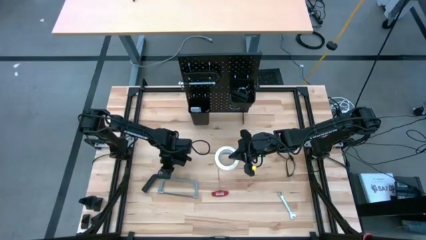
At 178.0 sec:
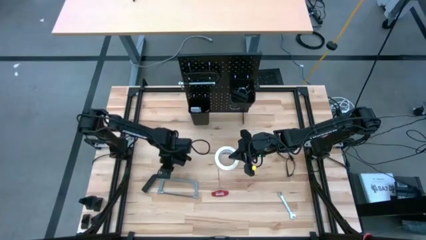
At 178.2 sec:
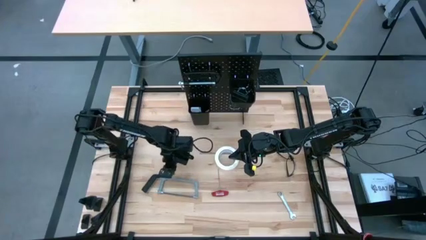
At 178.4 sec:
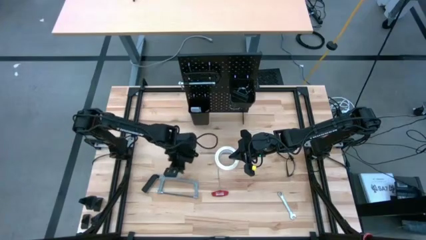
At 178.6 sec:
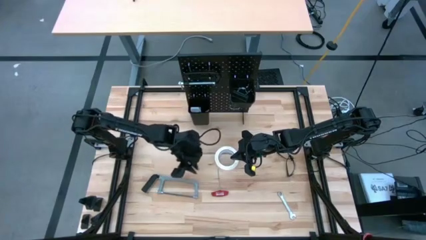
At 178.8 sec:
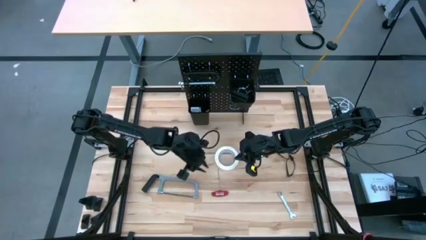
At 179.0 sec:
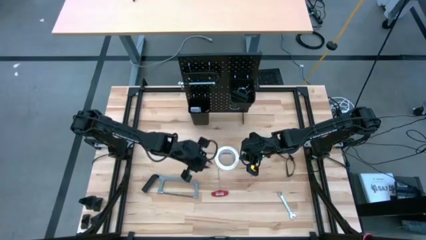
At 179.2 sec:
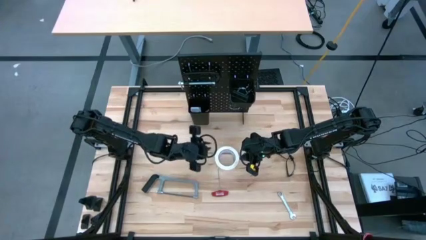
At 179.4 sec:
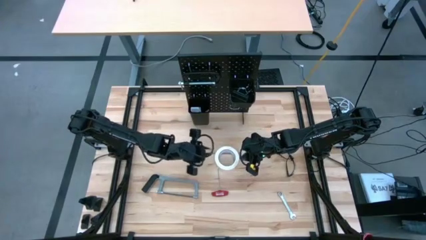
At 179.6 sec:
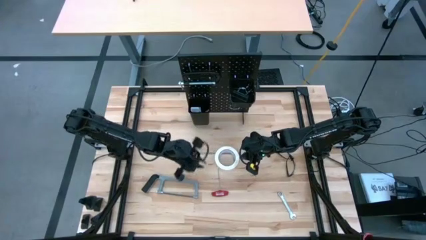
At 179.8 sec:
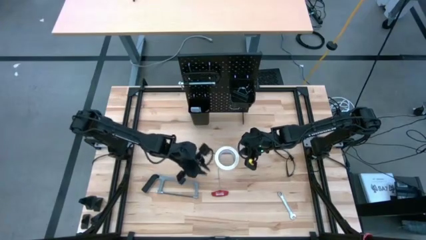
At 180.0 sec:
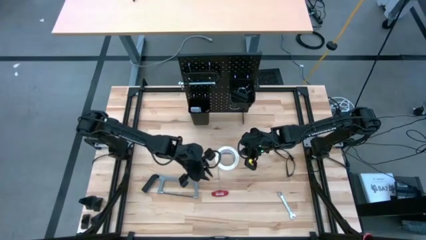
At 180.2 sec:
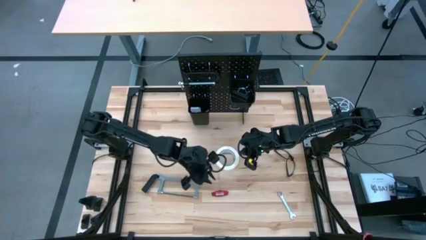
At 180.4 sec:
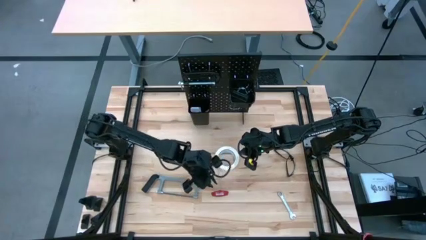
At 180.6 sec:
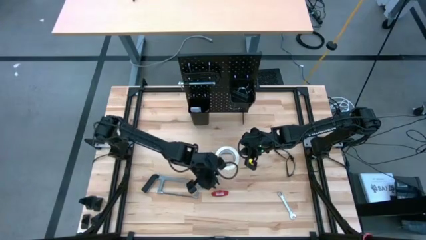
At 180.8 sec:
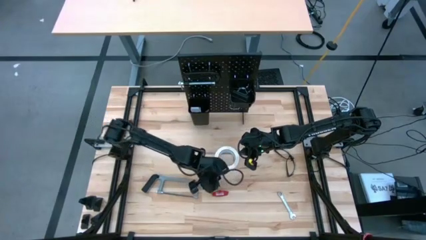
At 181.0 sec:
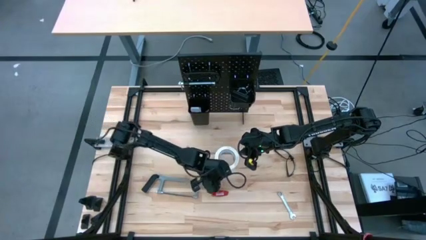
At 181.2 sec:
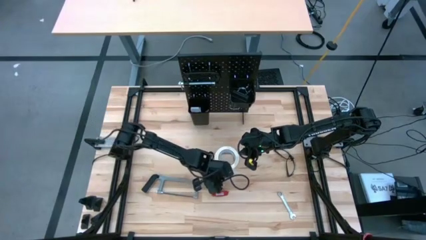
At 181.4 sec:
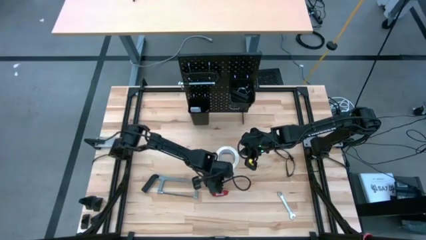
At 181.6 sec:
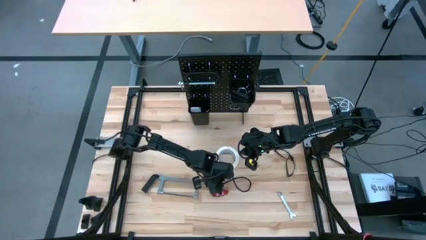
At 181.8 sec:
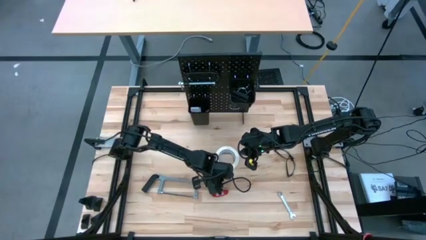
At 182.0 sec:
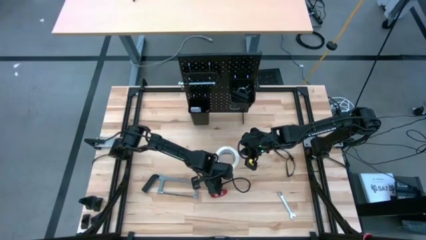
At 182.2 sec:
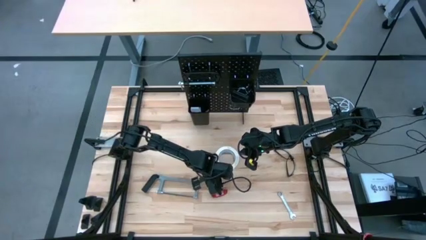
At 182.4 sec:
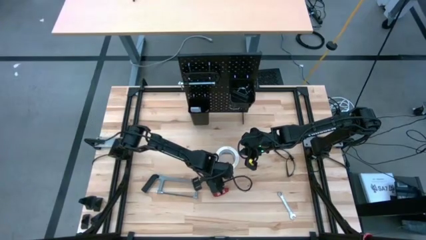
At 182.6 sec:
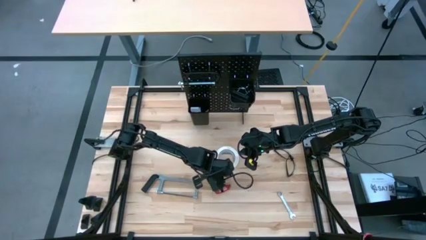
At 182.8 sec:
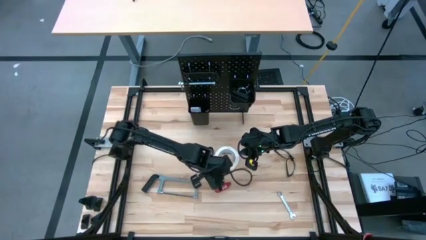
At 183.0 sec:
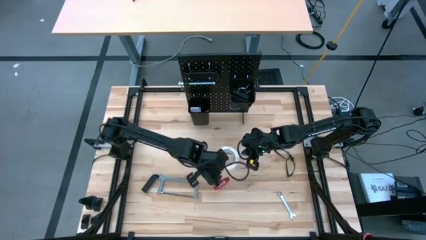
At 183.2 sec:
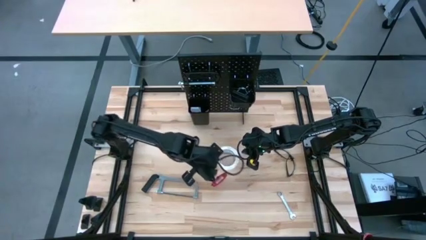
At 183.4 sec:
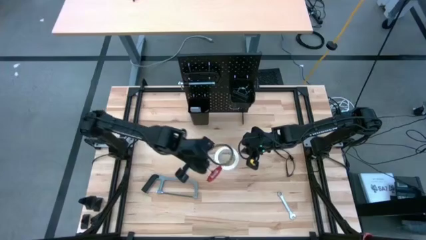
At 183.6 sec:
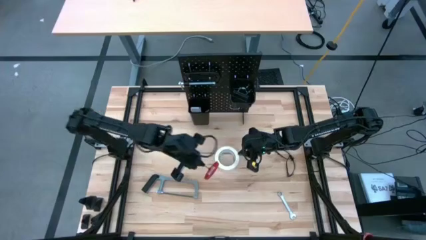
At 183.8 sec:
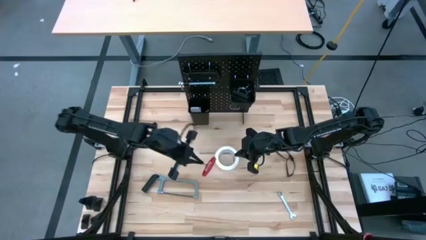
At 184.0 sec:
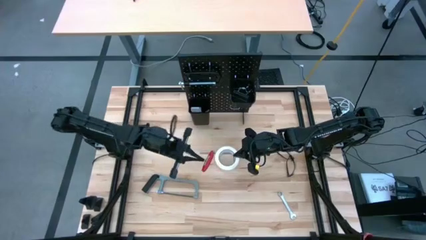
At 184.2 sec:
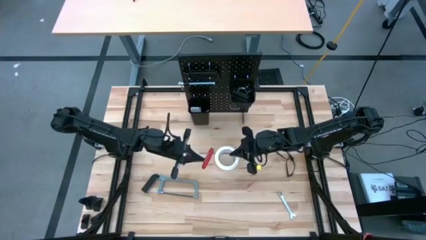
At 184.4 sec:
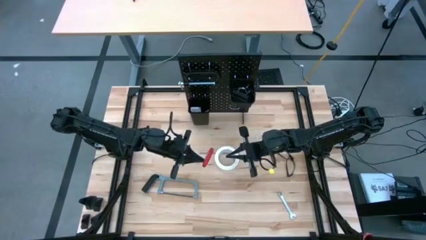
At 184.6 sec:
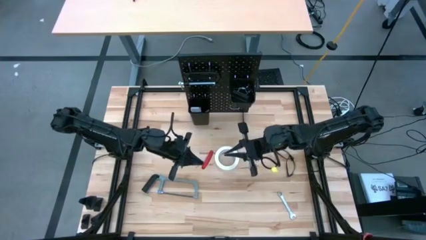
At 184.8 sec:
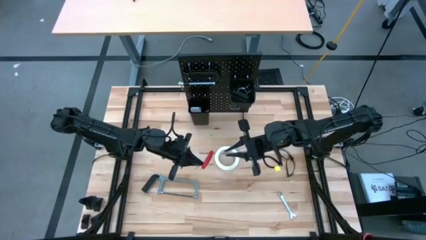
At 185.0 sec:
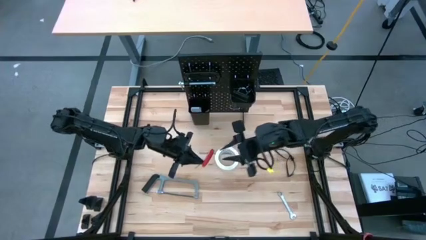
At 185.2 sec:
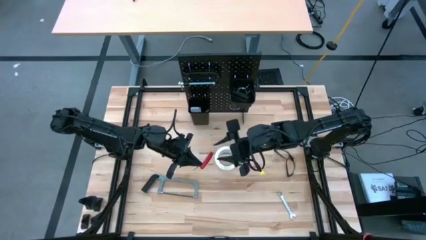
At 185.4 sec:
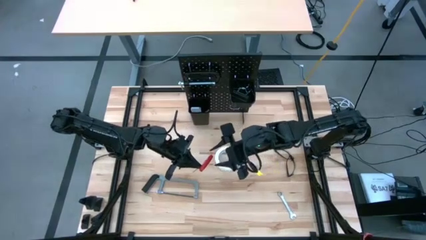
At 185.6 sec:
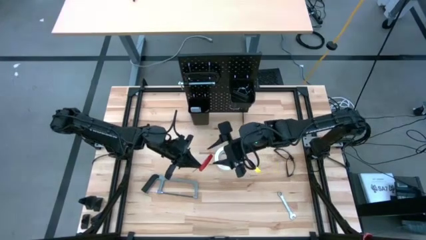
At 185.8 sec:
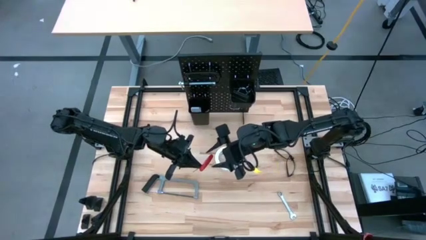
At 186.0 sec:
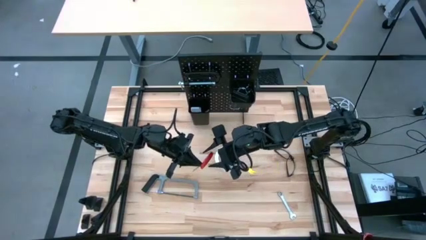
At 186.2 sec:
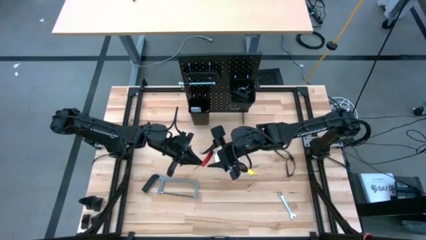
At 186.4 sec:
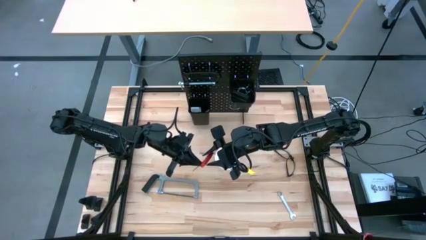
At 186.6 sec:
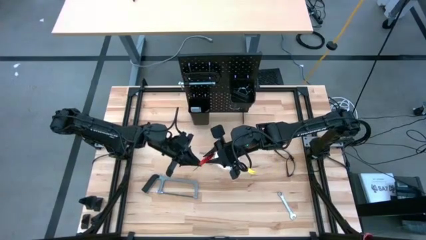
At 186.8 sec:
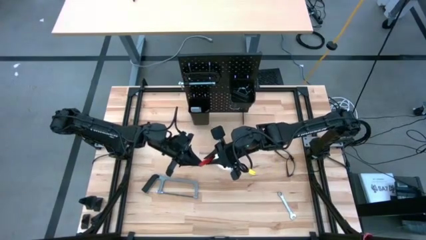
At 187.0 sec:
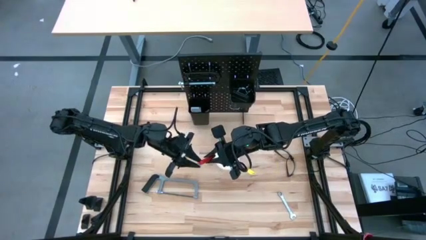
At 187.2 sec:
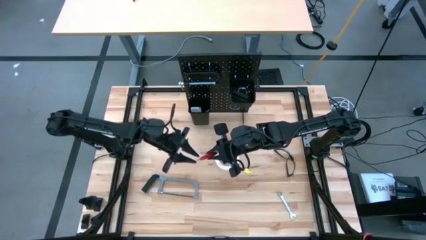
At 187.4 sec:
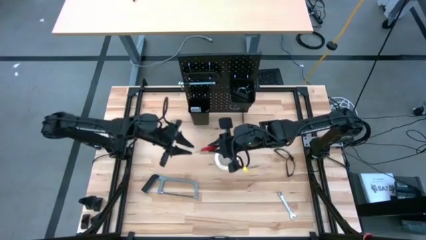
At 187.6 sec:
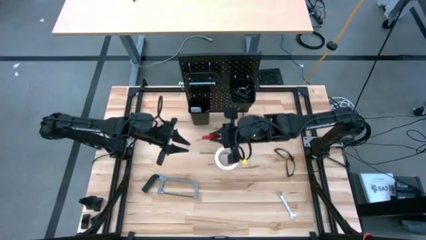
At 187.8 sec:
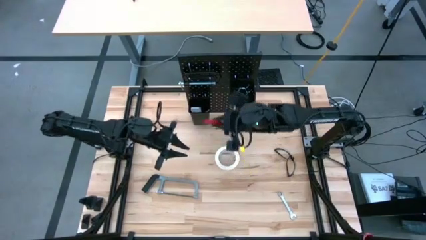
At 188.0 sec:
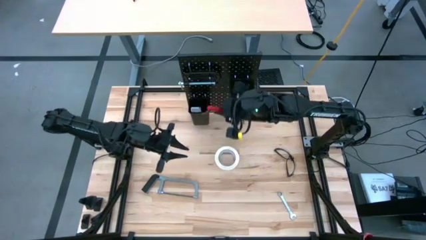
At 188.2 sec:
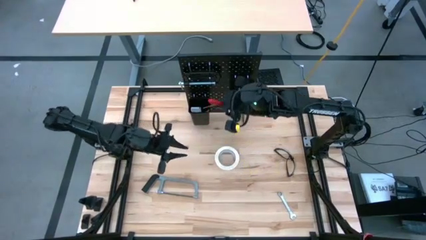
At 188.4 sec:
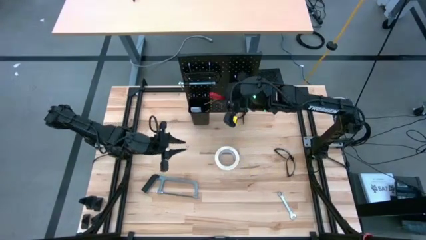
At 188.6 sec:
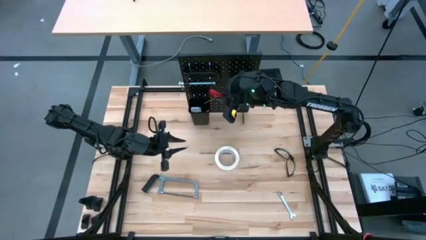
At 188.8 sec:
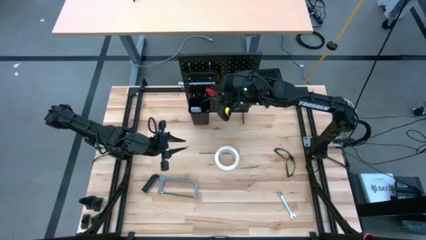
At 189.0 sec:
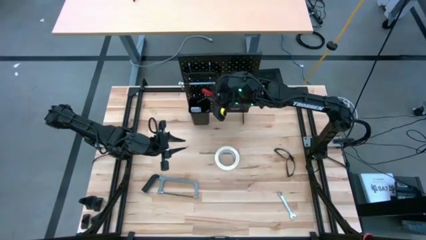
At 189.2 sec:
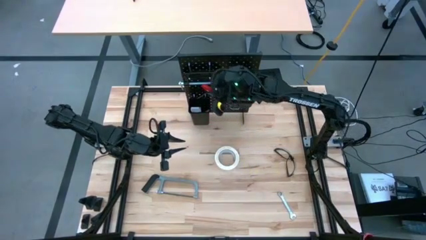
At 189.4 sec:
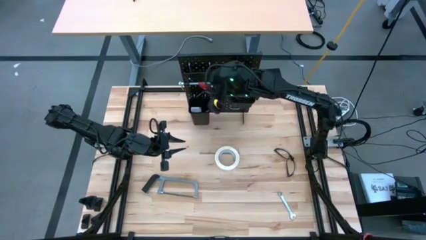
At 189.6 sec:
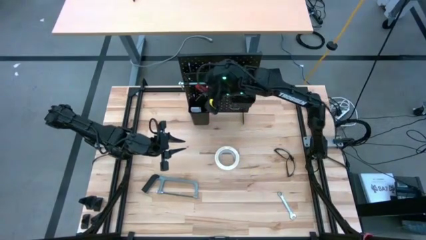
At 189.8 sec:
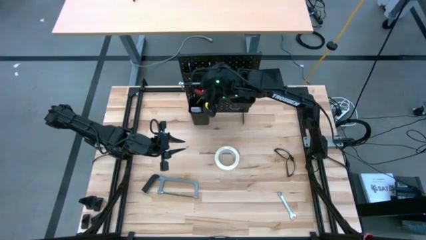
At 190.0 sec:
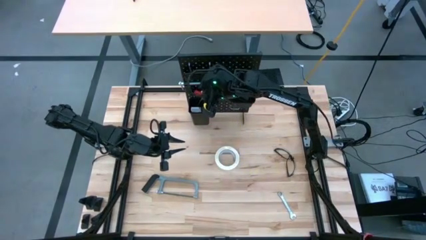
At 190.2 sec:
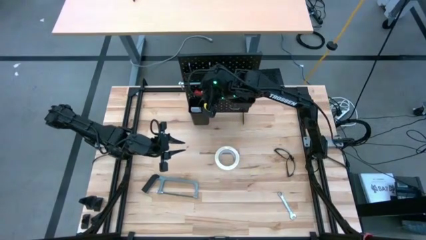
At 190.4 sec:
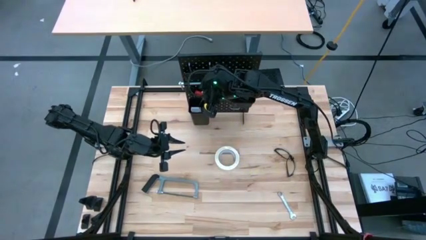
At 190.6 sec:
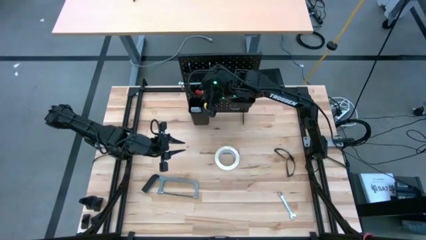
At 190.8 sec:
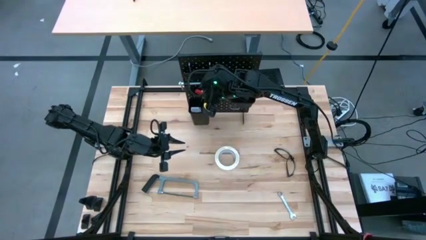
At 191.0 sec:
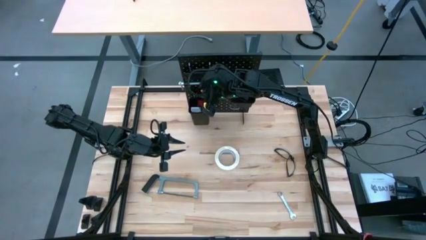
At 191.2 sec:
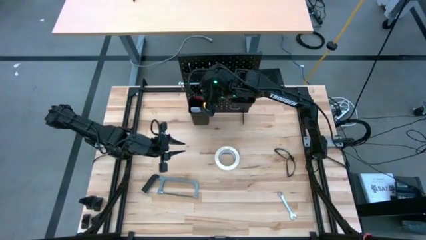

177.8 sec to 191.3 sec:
Task: Hang tools onto peg board
Put the red t handle screwdriver into the left black tool bin

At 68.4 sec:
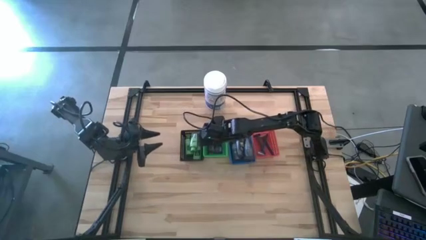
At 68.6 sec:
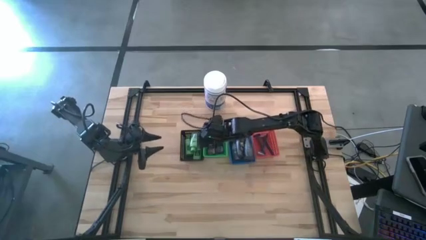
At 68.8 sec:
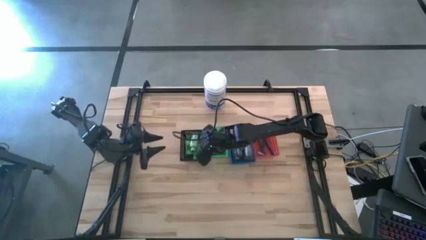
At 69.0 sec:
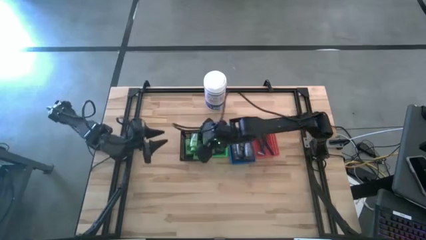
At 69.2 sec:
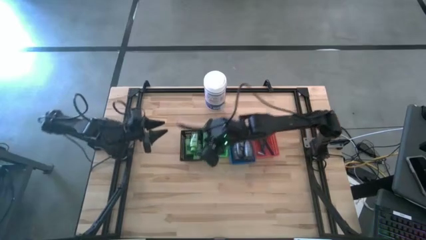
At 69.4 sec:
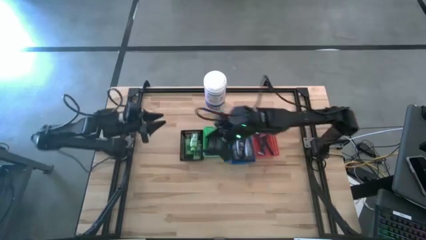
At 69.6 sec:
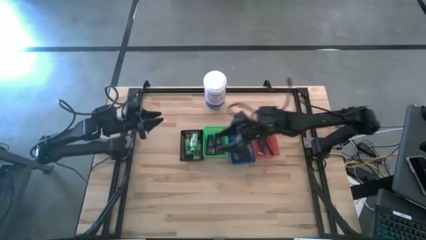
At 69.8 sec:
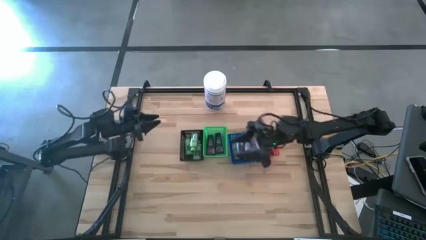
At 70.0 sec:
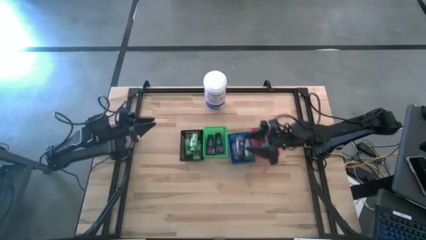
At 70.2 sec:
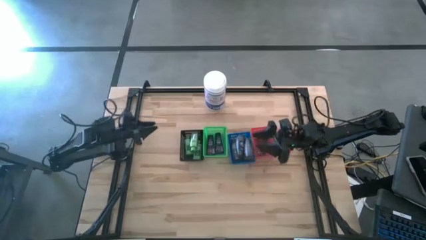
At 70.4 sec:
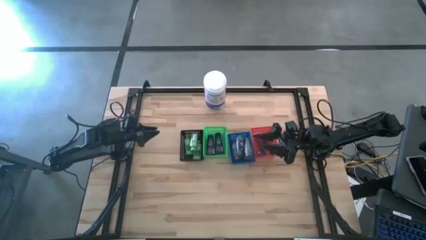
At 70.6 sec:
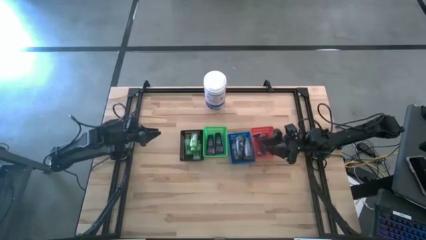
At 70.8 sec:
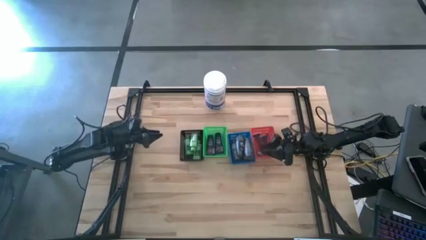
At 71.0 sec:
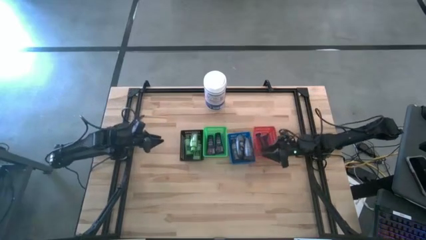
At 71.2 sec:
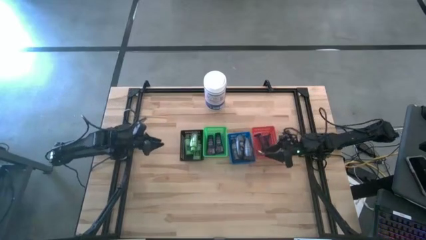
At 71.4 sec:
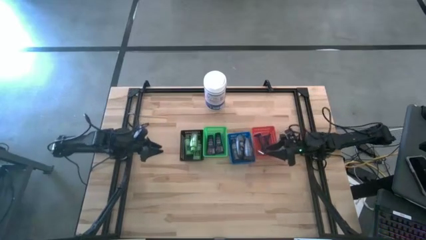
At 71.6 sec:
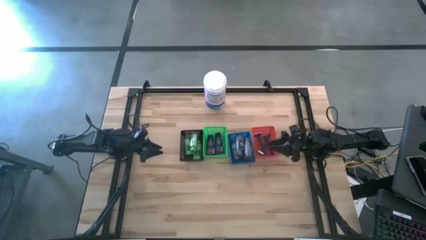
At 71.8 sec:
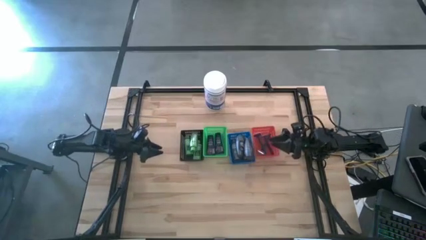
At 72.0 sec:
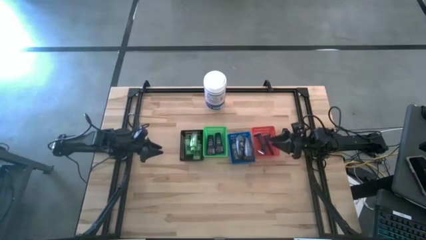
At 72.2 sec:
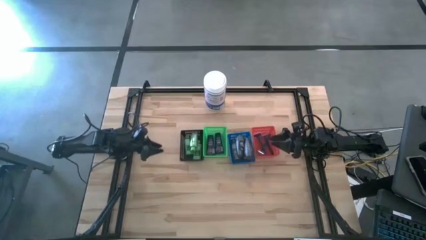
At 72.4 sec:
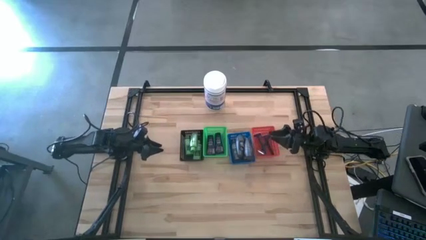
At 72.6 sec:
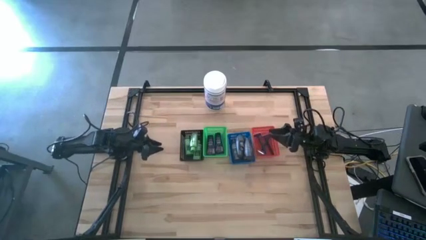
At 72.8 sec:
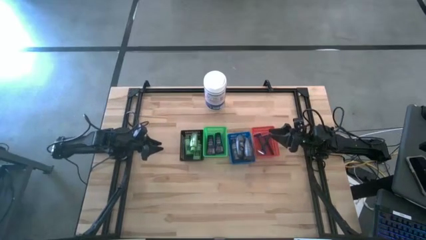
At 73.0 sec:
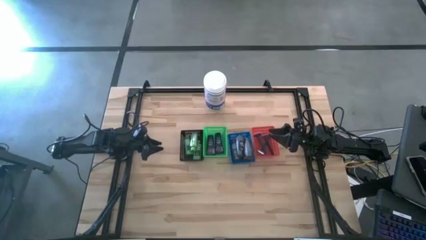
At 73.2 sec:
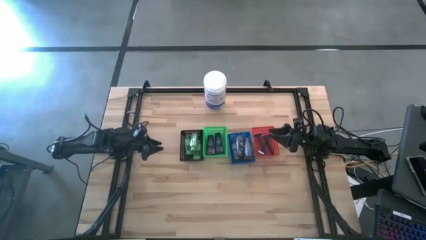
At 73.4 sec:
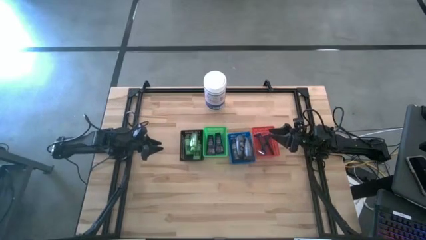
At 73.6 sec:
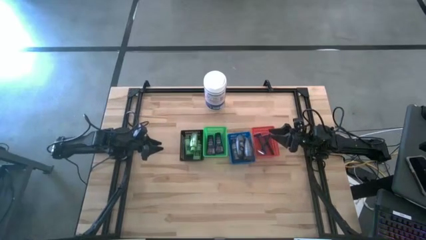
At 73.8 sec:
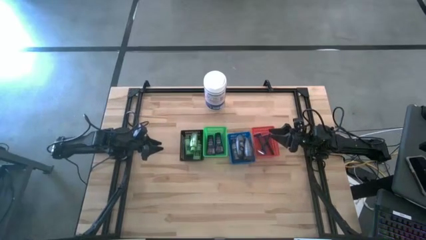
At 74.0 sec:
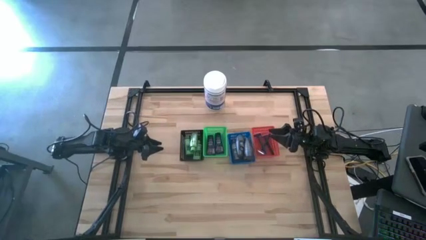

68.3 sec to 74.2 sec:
Task: Pick & Place Travel size toiletries
Return to Home Position
